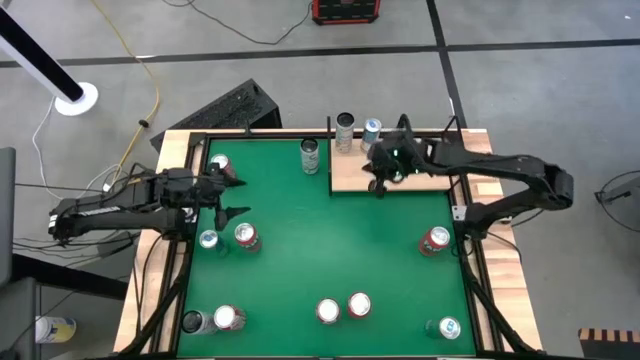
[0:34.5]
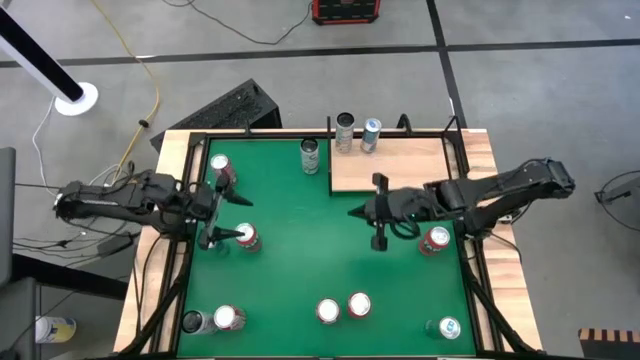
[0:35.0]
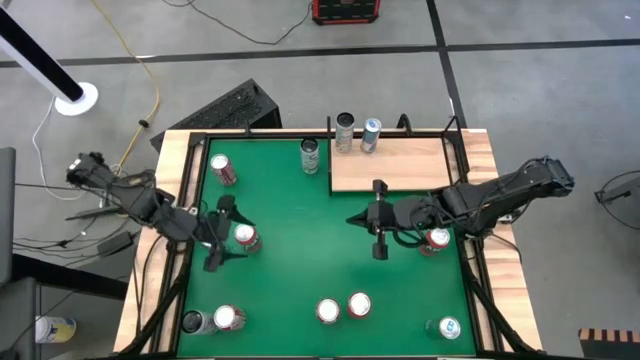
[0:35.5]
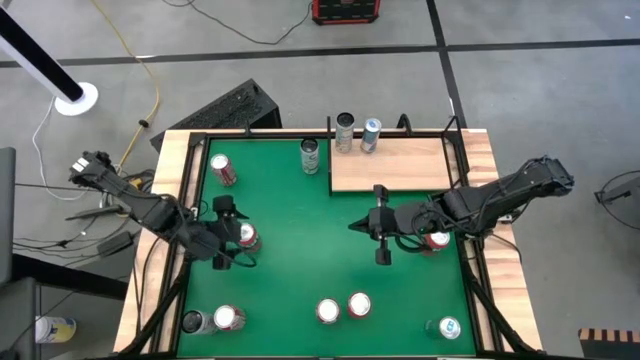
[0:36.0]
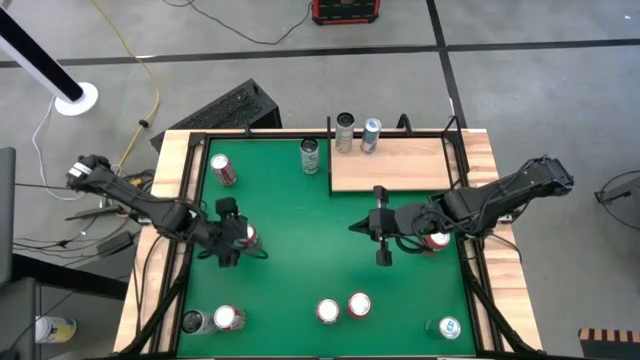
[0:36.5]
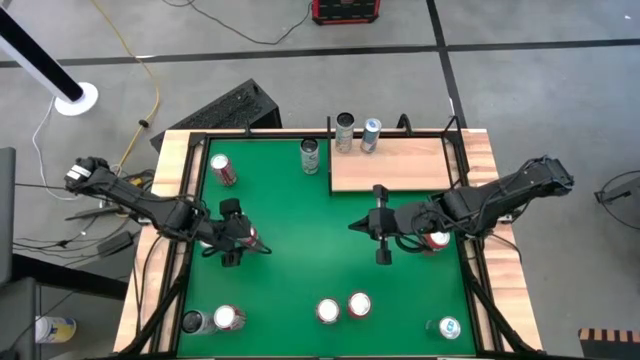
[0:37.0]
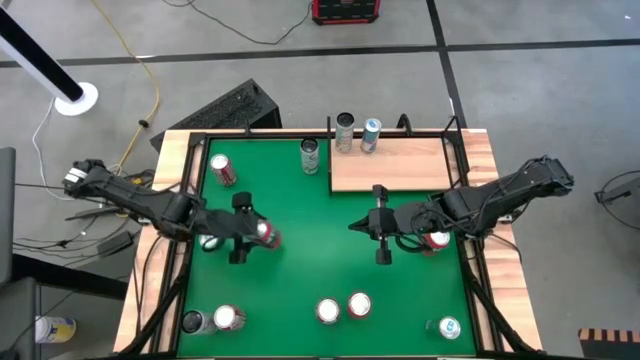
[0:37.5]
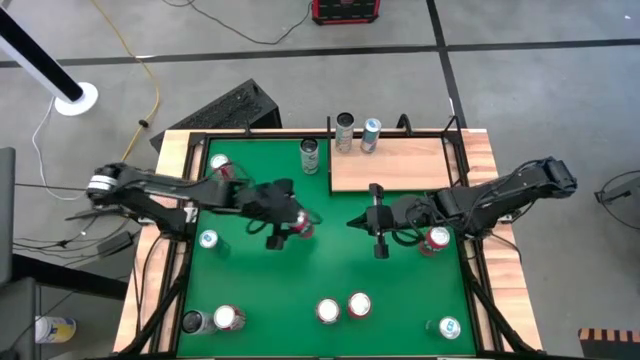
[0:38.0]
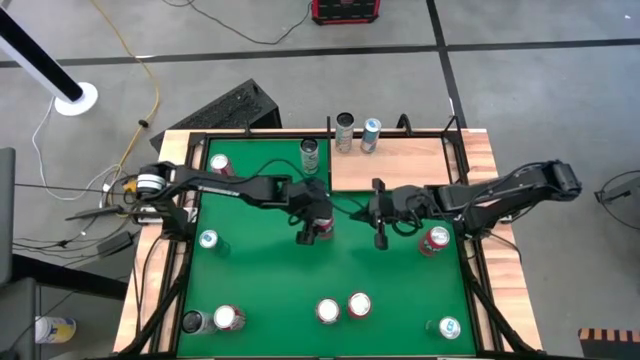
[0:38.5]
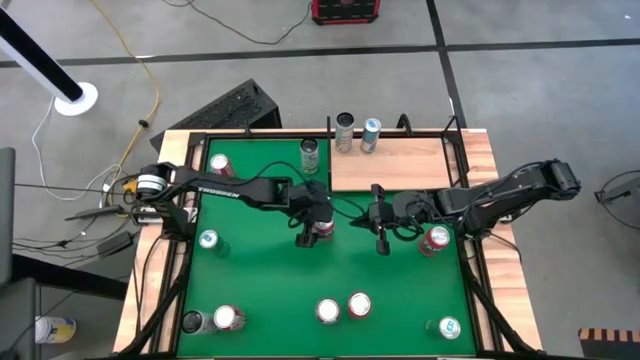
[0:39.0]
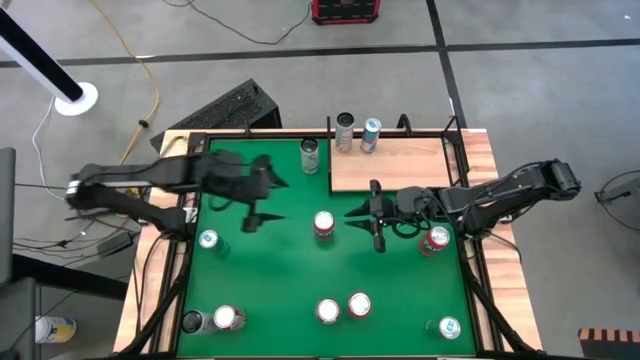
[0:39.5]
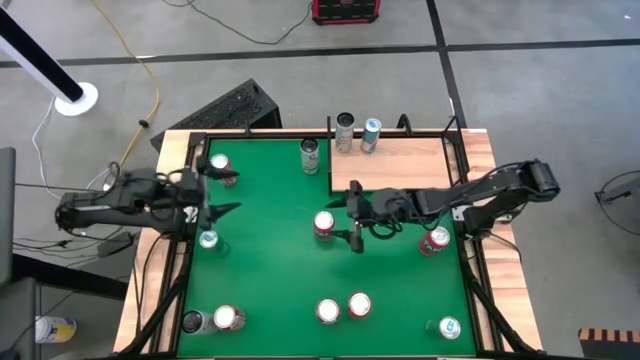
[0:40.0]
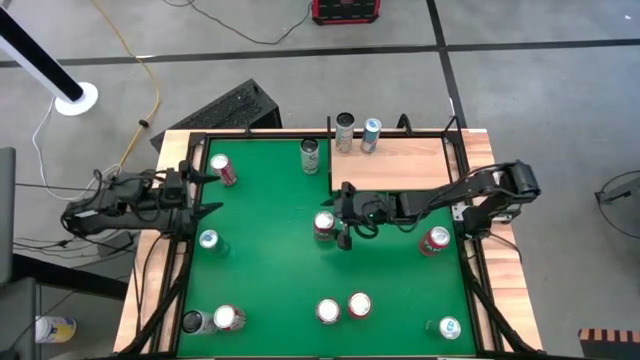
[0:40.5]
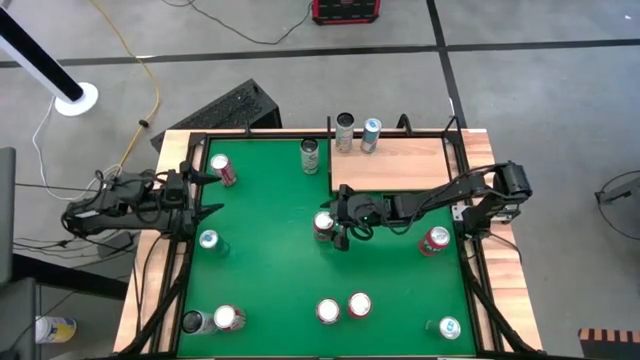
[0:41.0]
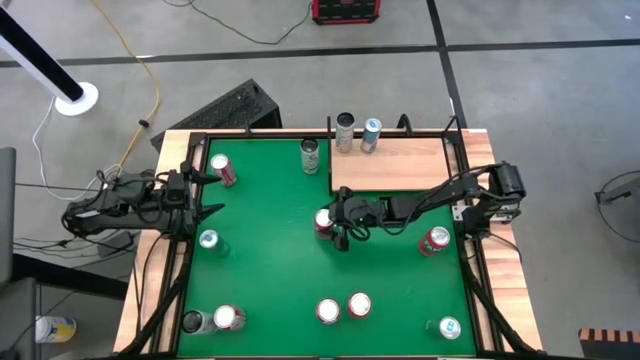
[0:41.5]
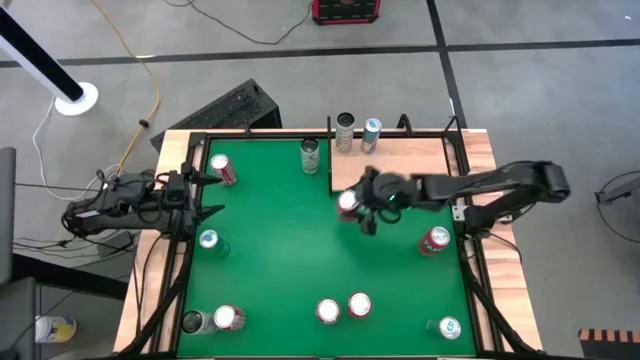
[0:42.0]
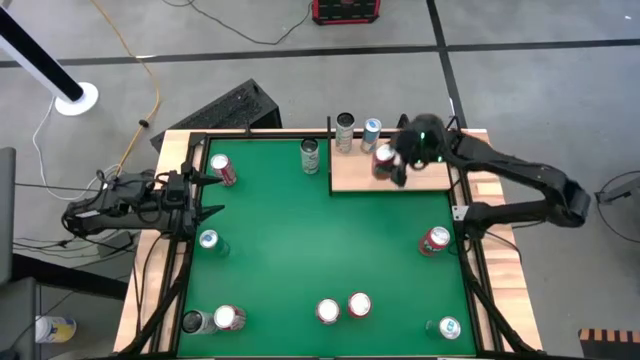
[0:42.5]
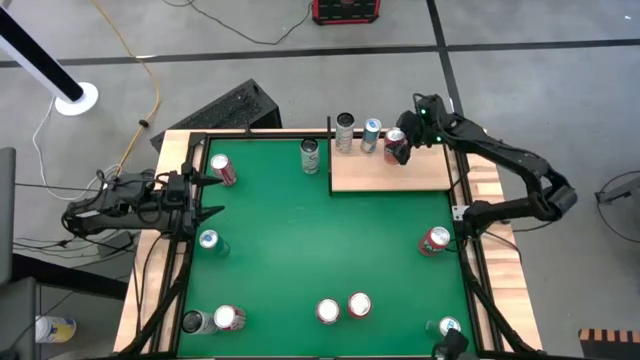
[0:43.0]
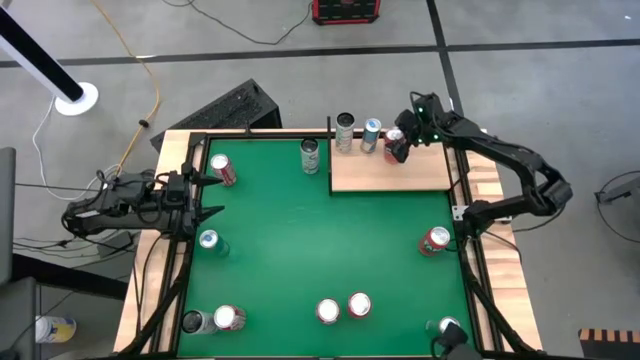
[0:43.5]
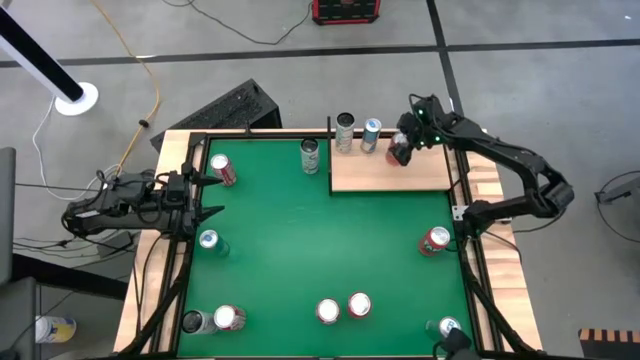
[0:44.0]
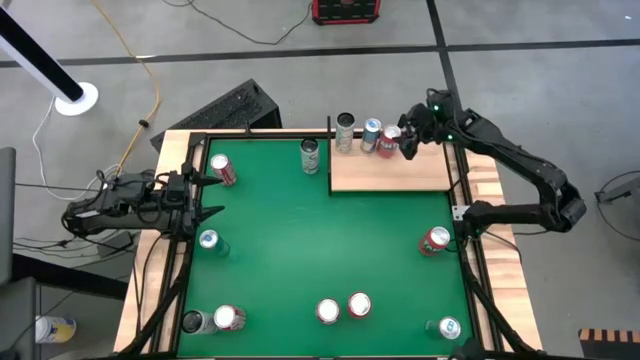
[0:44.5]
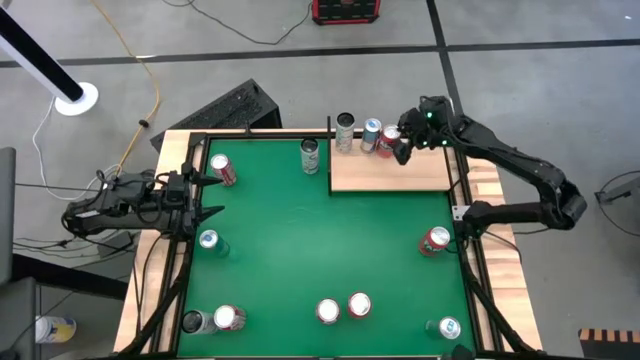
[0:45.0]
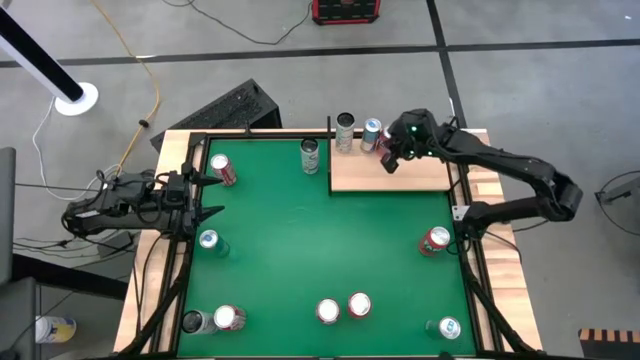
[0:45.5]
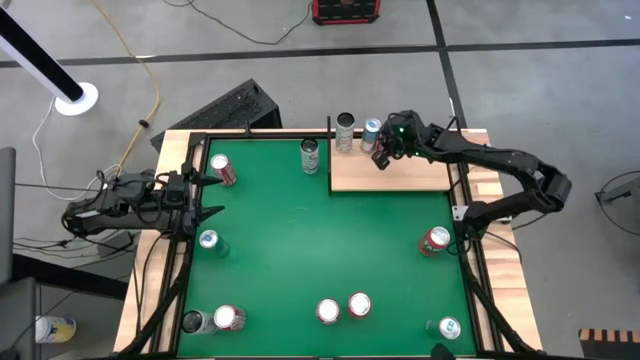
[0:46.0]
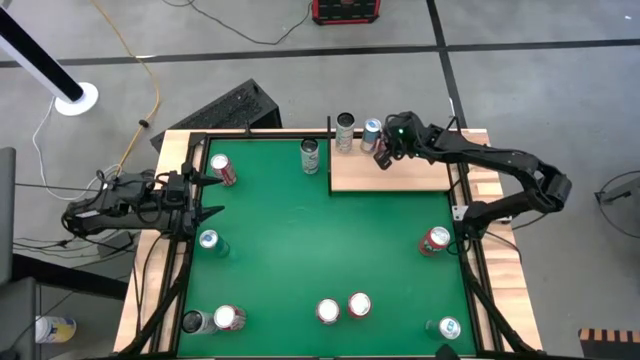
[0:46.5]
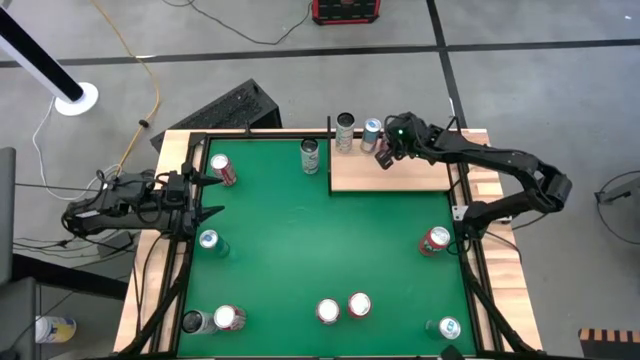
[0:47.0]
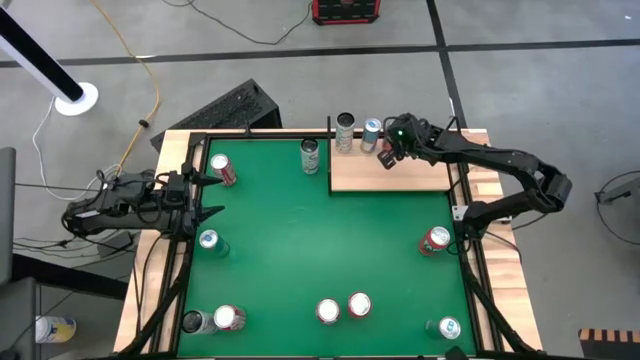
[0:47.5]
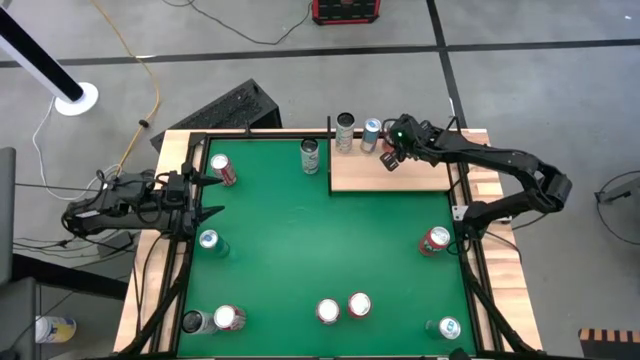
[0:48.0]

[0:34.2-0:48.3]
Task: Sort soda cans
Put the left orange soda can on the shelf
